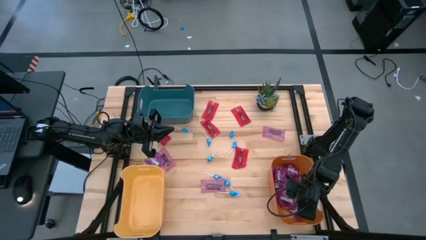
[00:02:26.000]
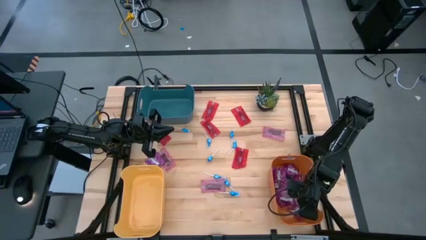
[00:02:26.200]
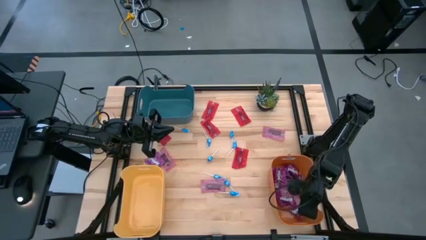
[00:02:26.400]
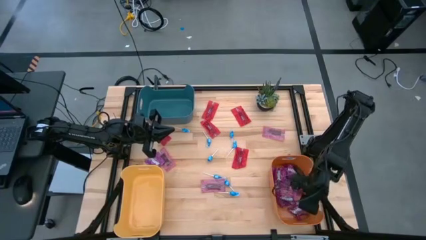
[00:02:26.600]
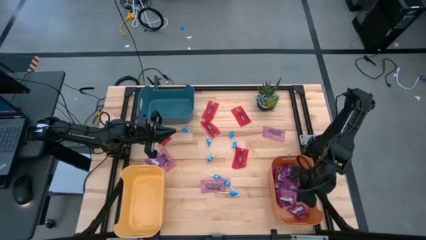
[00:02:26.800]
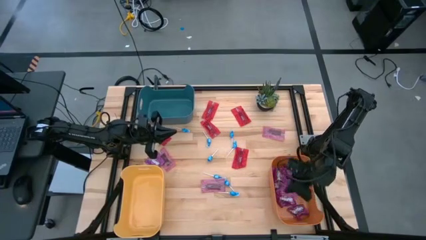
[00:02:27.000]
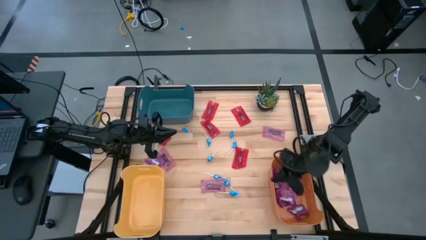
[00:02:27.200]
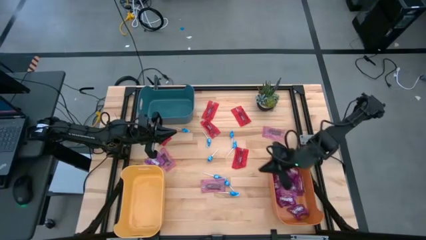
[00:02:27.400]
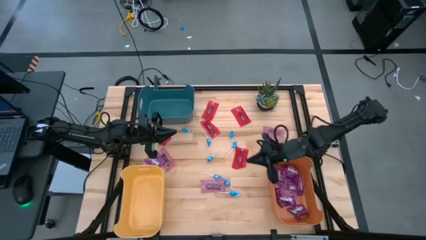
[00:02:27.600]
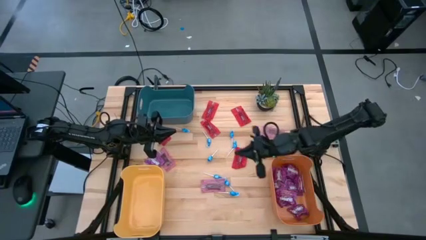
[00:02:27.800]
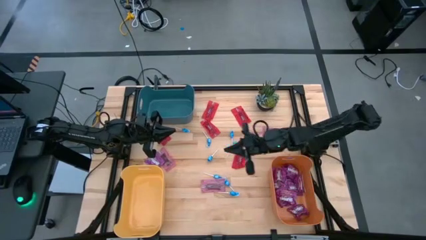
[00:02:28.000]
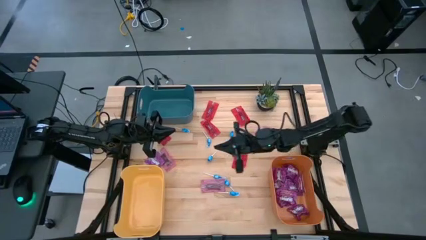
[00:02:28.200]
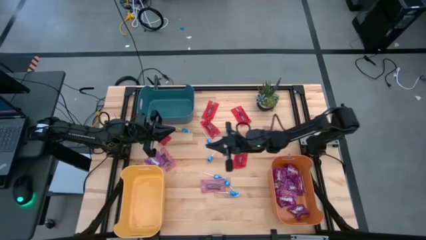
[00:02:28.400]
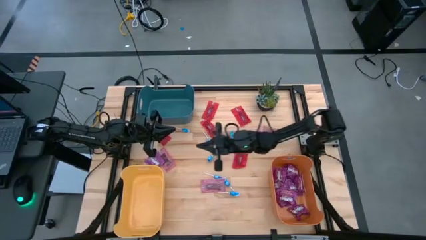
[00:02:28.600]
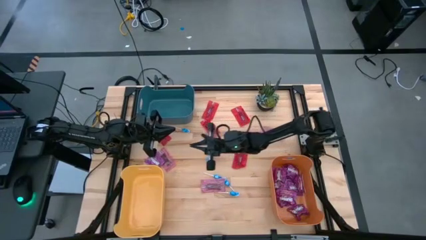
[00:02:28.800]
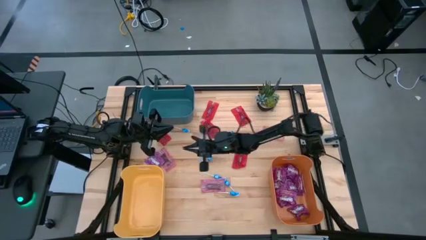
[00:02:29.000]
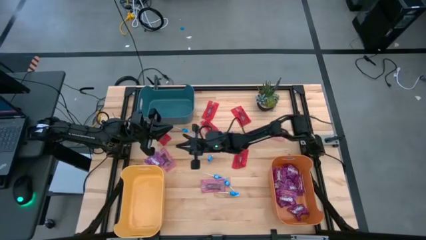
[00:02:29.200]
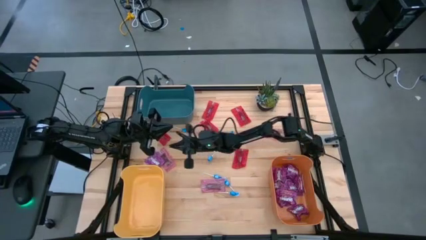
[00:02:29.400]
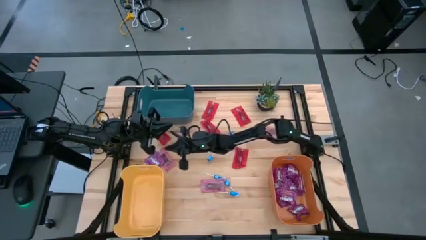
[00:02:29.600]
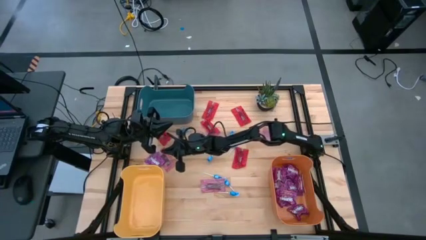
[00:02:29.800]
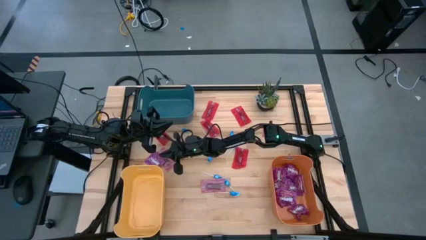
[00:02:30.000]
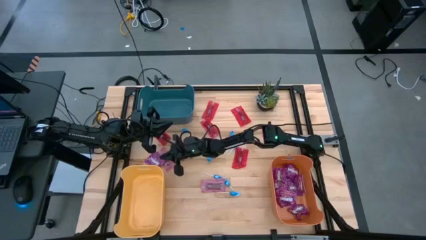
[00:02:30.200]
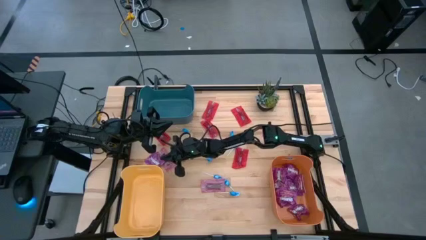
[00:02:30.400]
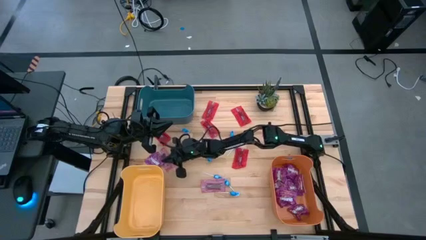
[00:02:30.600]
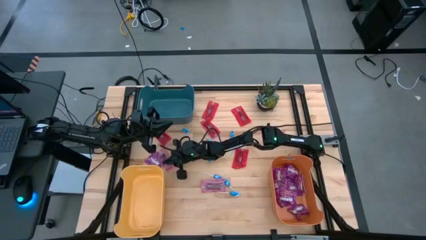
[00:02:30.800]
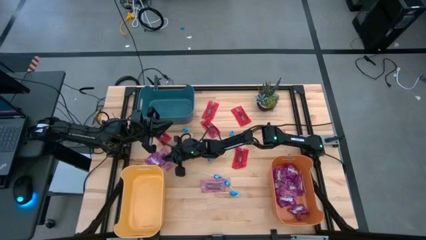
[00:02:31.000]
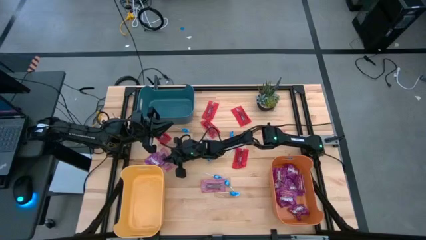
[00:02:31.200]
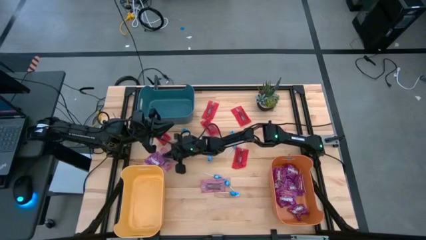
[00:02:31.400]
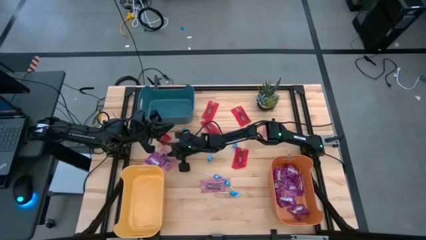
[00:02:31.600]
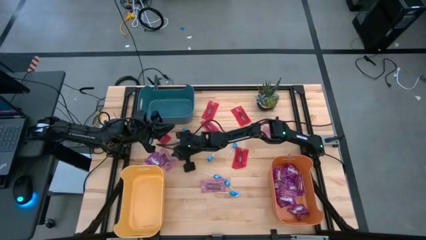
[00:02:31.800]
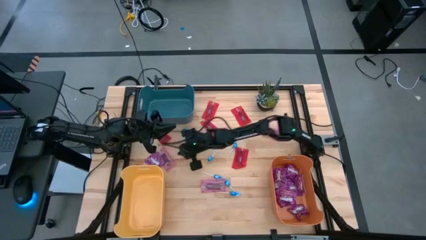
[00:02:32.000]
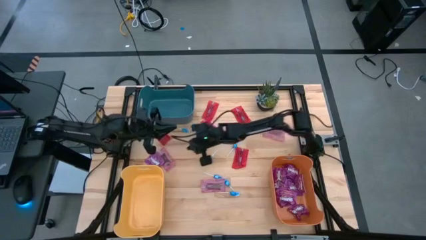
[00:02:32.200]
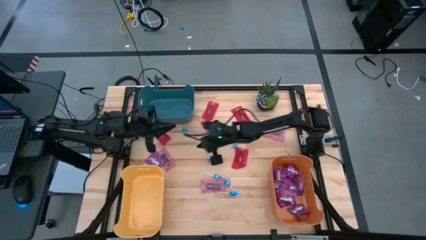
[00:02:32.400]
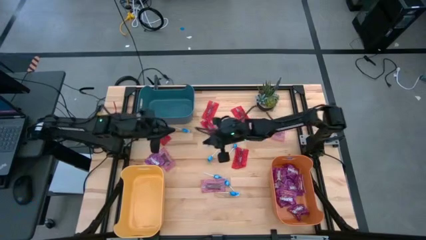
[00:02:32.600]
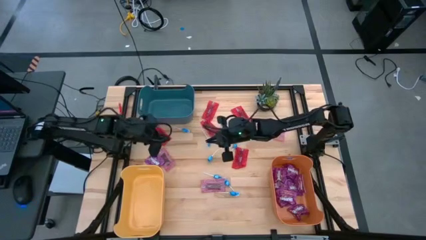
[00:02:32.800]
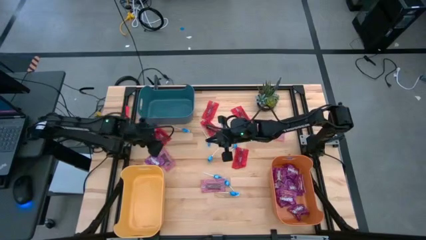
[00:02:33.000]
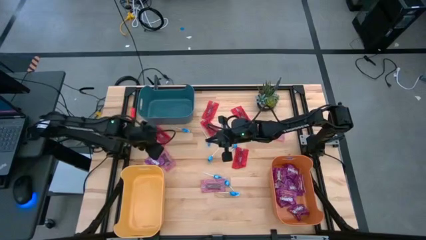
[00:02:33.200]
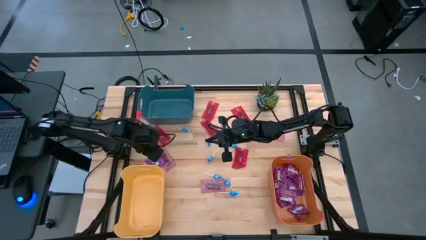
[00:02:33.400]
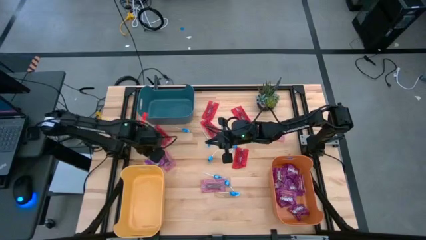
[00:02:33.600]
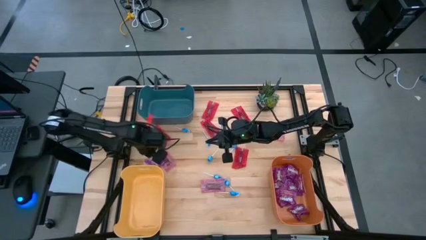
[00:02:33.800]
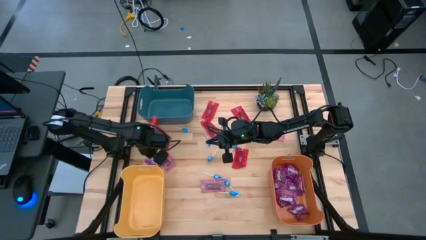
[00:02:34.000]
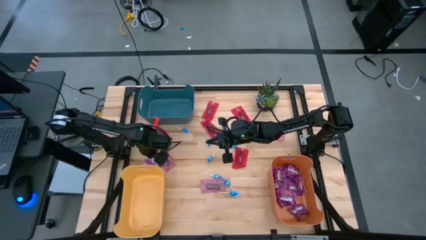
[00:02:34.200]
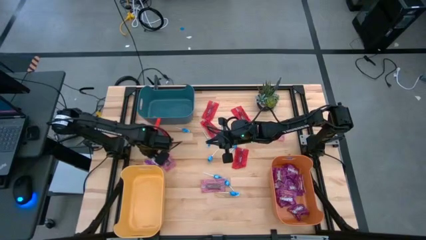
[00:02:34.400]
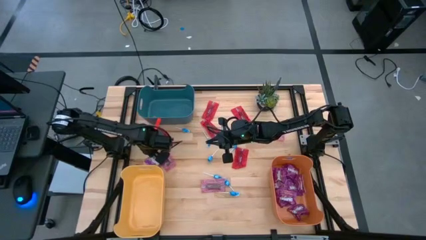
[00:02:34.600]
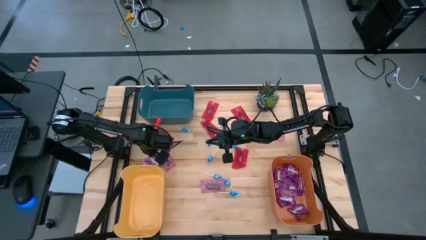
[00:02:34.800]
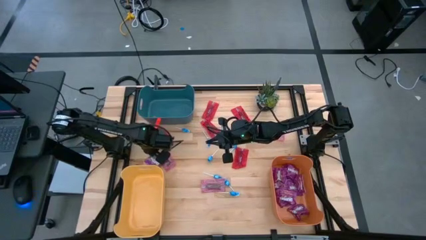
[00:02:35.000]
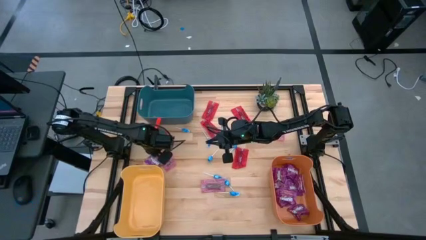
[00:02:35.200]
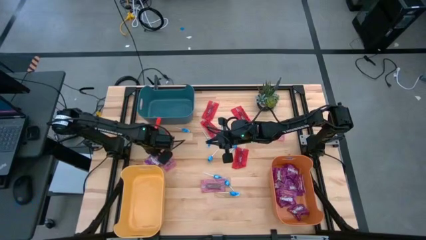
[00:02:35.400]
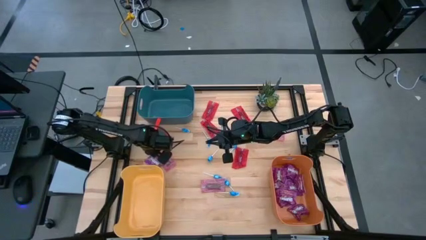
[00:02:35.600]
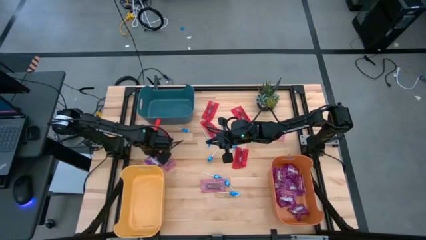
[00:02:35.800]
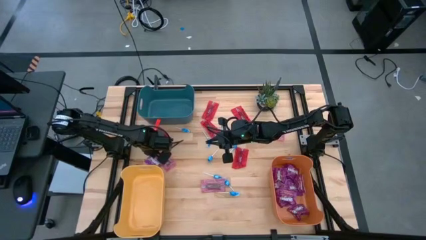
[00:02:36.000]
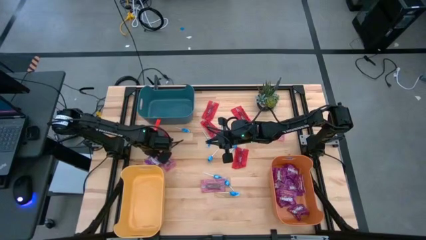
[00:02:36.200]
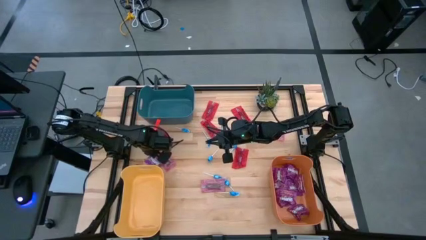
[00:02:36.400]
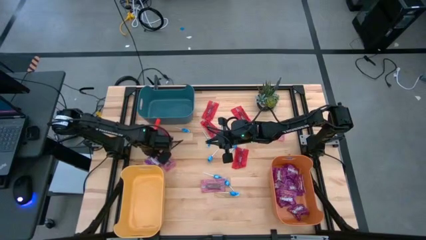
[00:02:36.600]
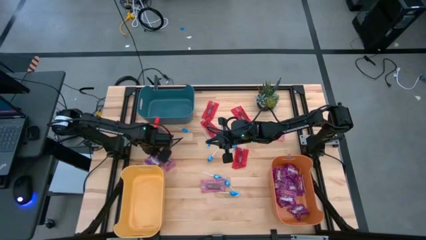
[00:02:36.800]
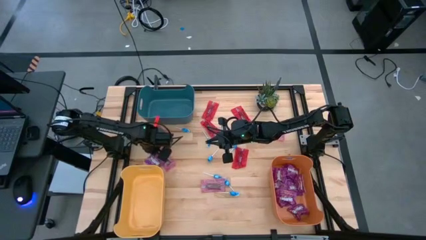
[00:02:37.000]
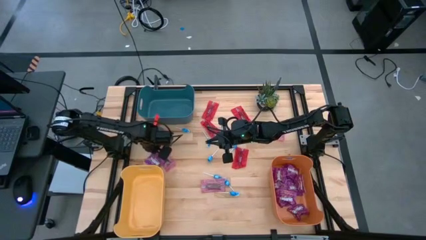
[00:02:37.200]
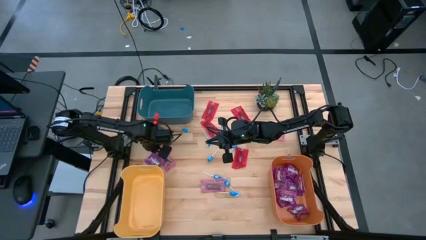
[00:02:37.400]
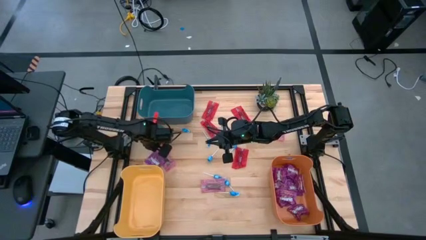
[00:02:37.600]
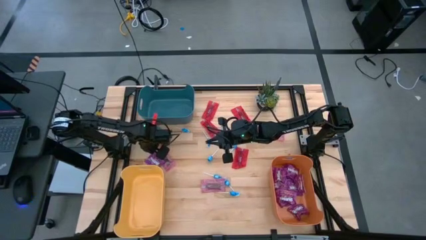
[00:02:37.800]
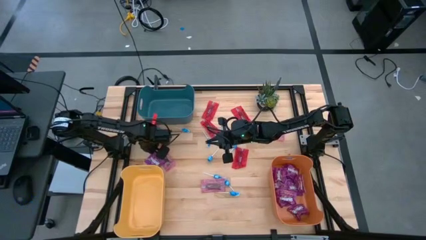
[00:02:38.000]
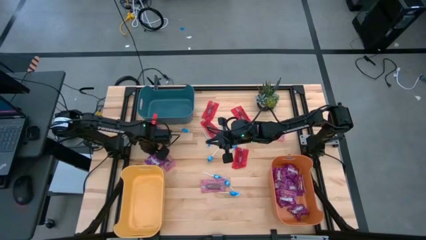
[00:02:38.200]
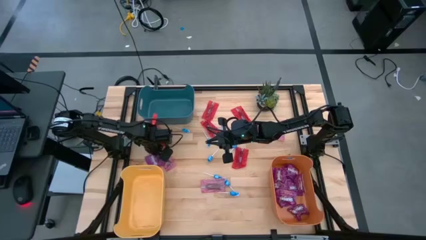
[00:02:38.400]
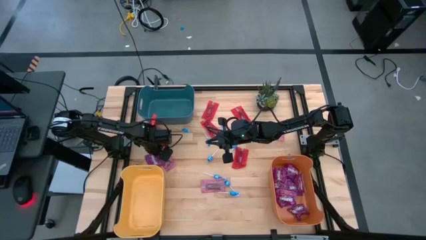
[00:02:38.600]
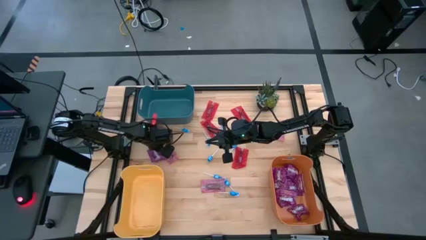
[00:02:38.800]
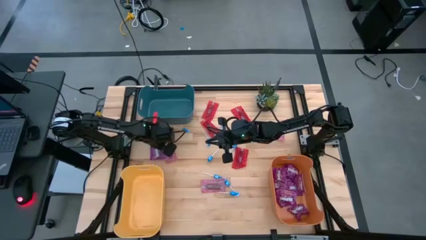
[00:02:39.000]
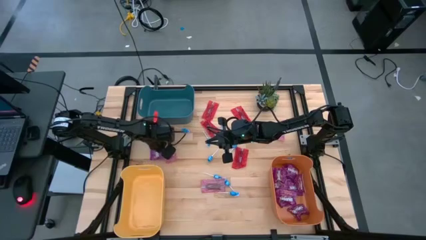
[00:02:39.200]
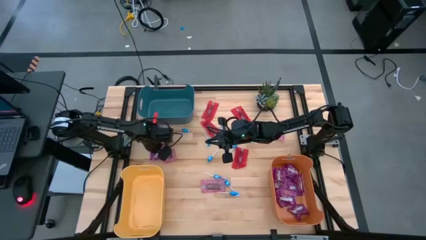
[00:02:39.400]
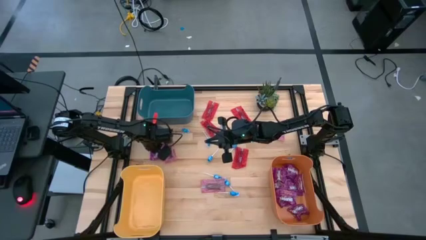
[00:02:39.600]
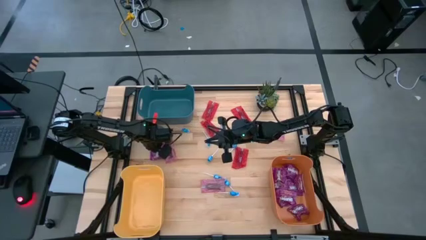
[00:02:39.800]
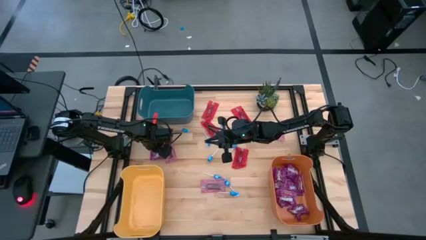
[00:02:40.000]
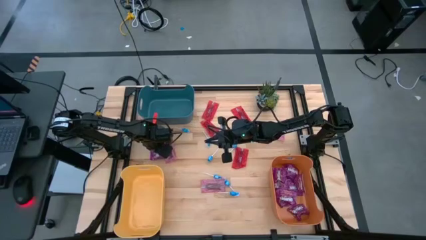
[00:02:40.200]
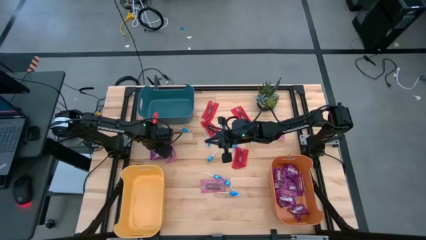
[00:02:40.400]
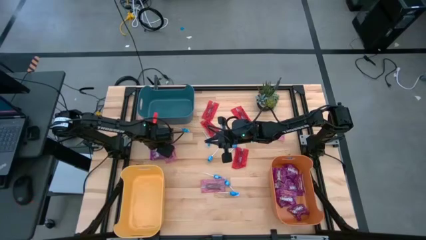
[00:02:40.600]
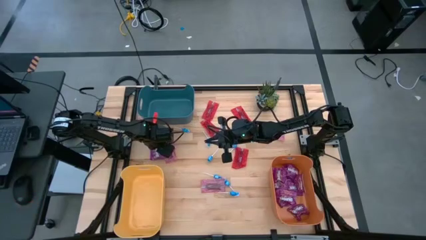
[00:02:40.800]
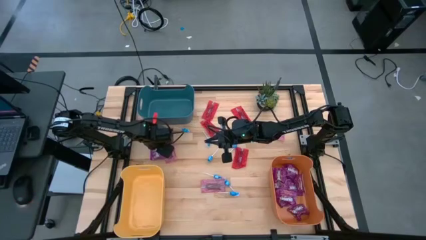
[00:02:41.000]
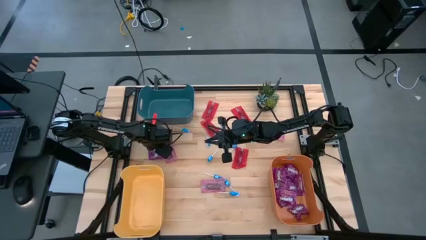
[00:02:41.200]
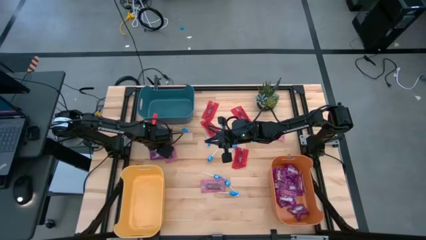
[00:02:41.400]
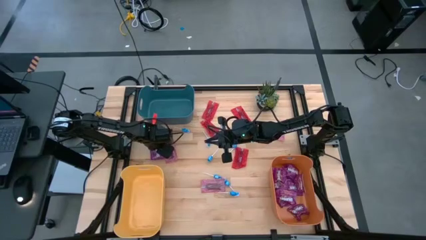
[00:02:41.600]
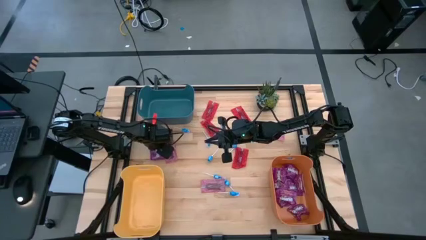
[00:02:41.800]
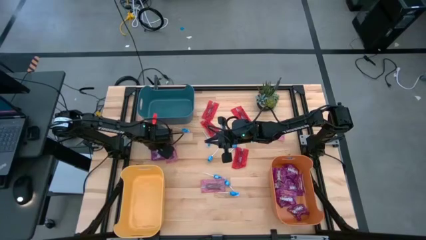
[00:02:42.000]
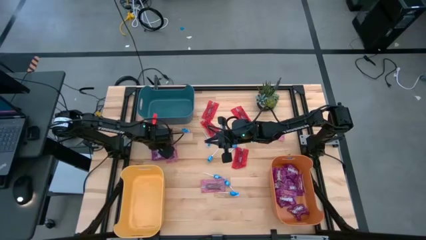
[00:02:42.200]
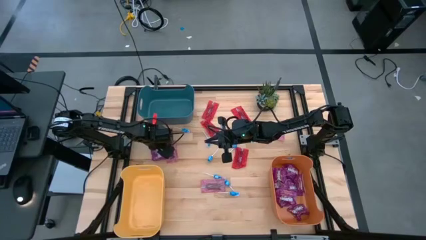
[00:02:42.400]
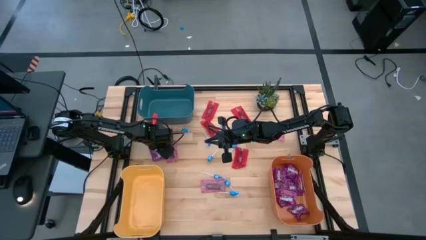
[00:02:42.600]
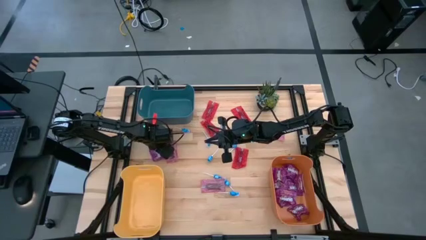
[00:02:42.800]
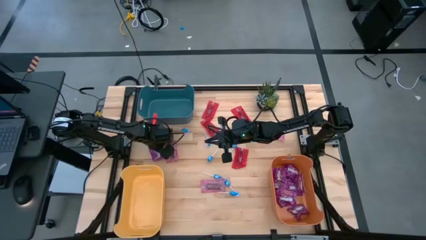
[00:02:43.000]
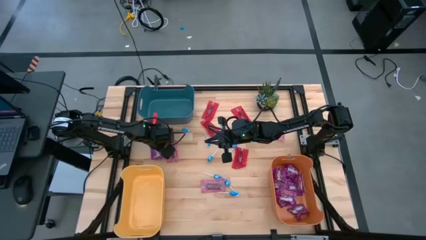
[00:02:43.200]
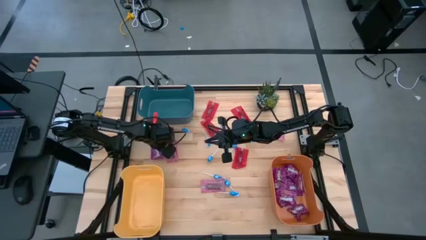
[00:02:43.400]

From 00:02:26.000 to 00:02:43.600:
Task: Sort candy
Put the purple candy into the orange bin
